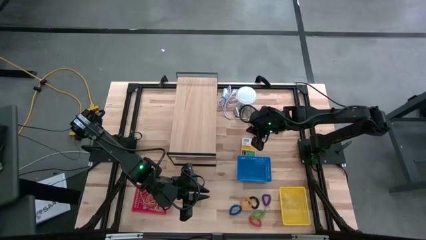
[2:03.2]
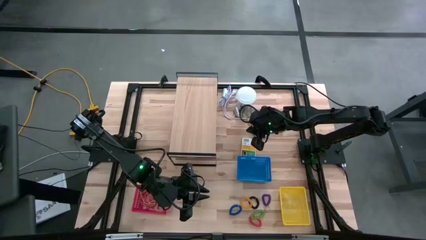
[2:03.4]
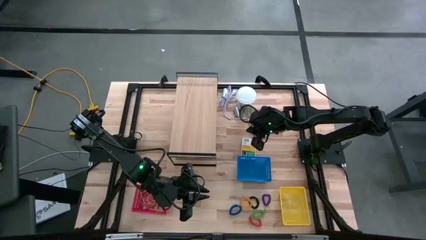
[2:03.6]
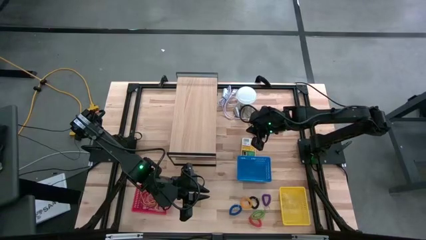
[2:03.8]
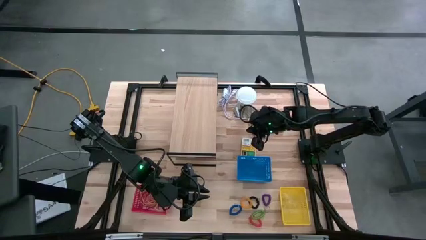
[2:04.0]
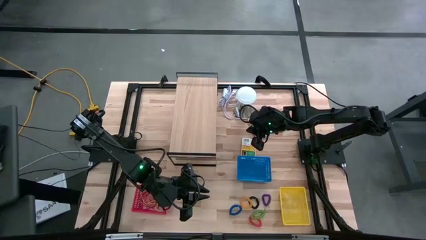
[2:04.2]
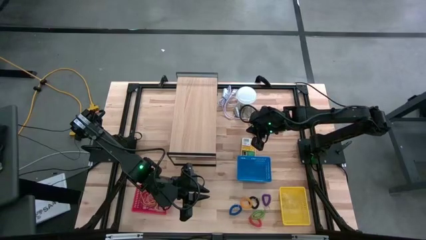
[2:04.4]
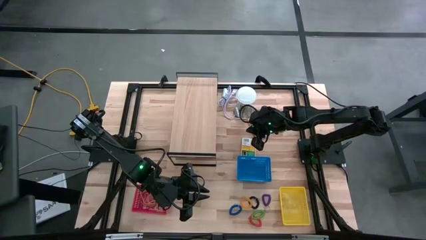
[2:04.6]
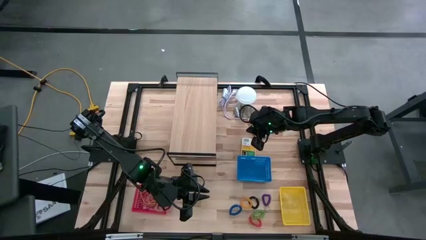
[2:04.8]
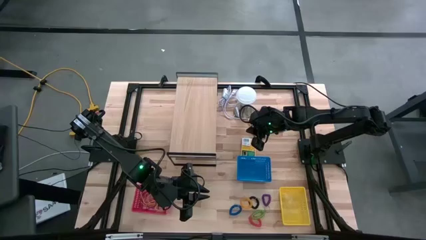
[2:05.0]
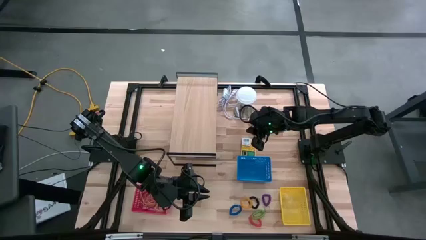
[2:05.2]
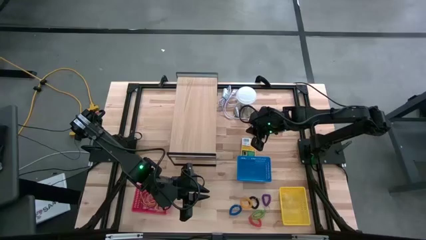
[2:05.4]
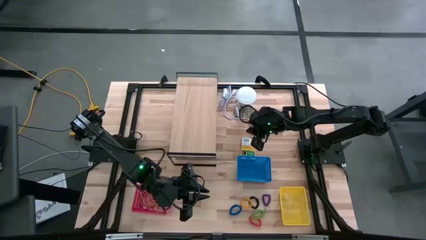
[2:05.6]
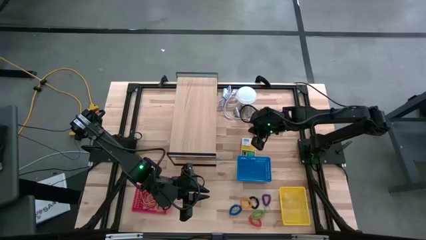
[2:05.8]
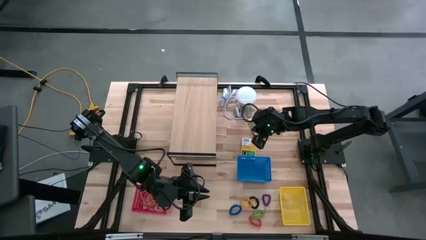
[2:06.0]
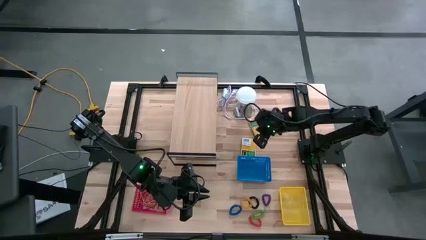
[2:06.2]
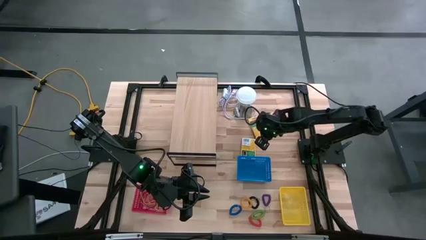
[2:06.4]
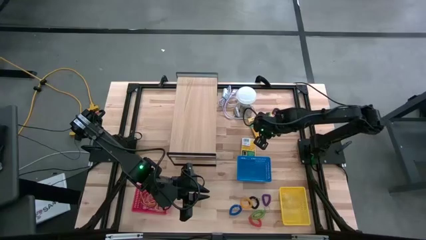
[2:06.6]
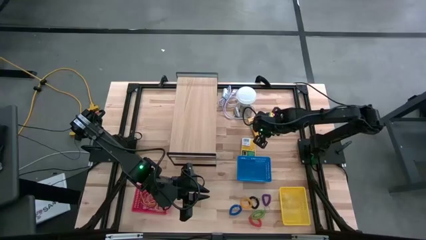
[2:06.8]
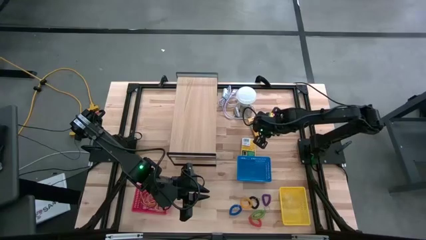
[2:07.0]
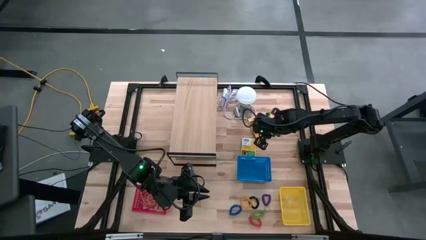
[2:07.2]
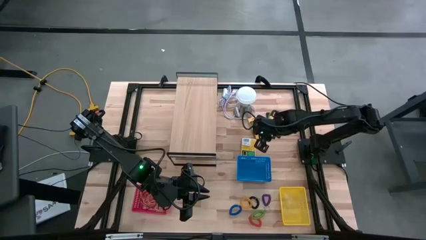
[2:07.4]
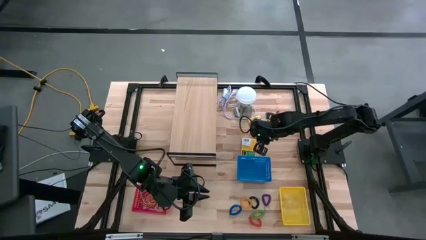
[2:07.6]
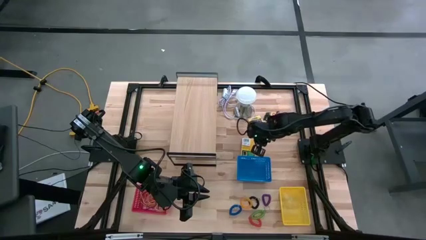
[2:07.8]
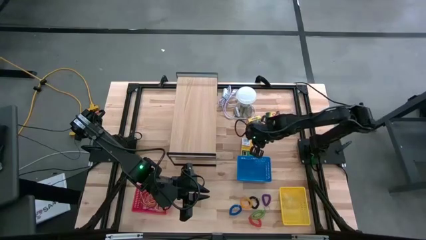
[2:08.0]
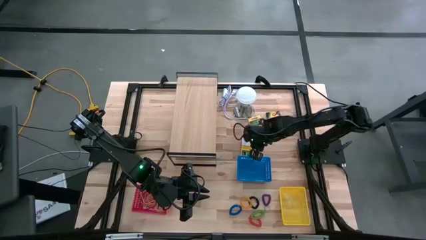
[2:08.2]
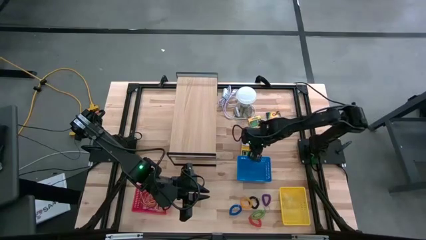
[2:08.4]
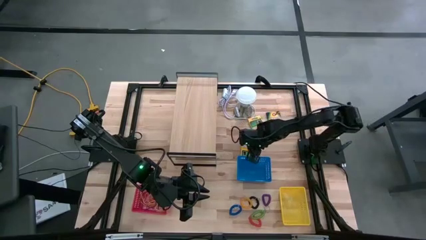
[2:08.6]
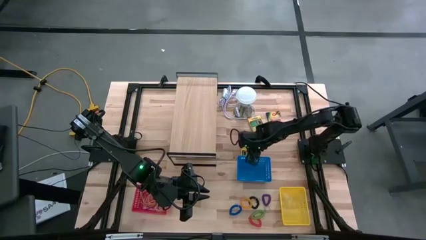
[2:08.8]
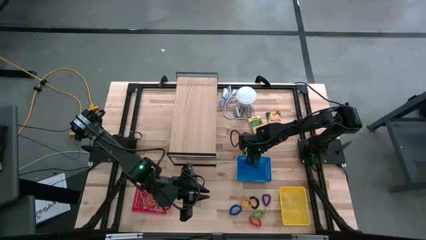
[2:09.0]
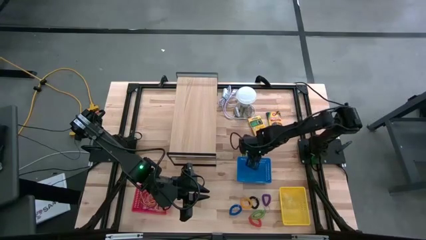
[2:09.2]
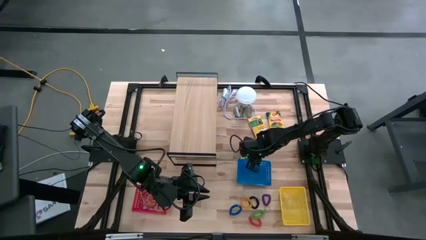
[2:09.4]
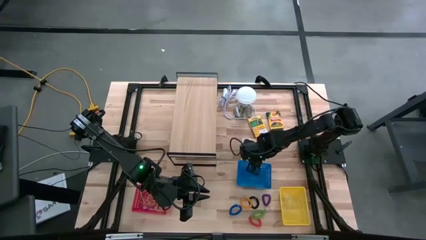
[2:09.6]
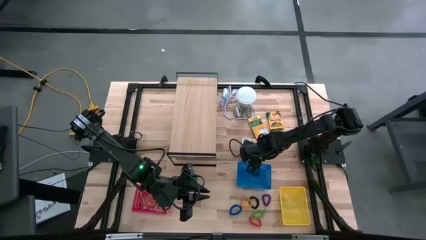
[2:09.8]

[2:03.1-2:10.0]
Task: Pick & Place Office Desk Supplies
Adjust the blue bin

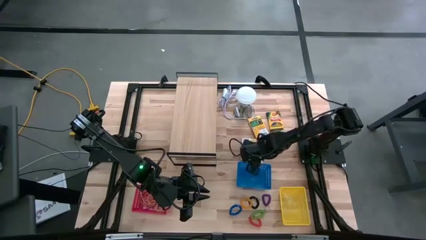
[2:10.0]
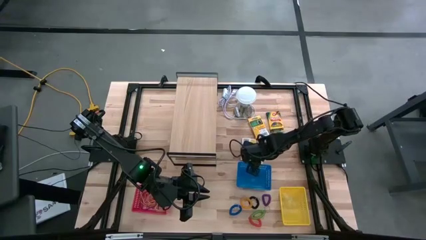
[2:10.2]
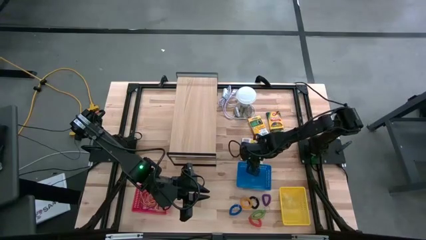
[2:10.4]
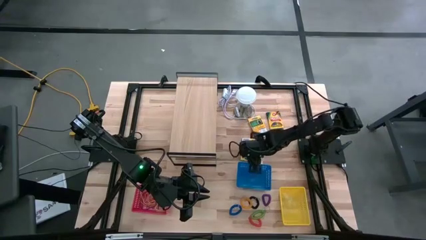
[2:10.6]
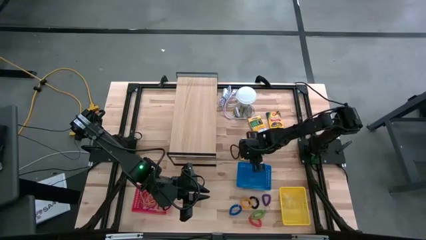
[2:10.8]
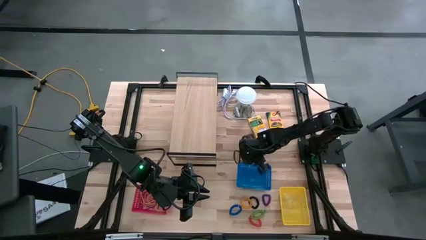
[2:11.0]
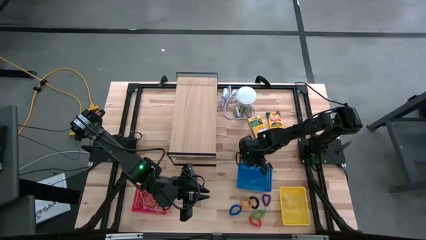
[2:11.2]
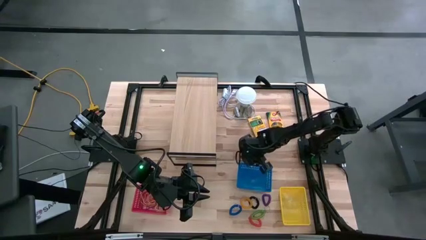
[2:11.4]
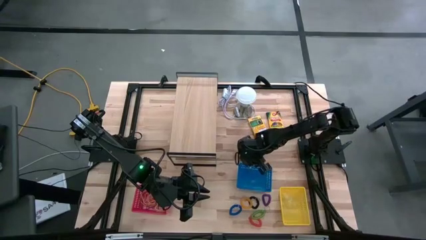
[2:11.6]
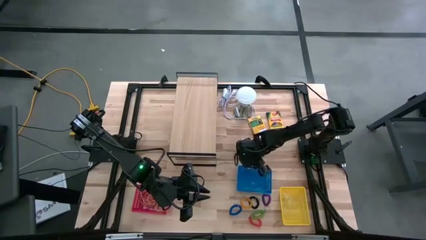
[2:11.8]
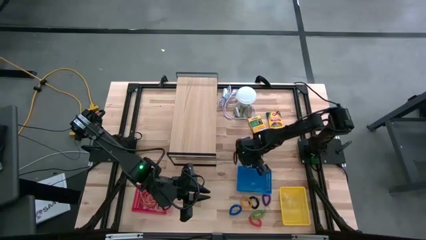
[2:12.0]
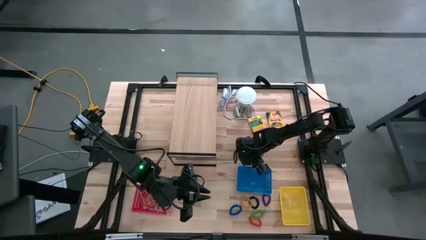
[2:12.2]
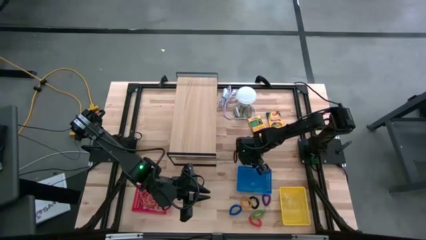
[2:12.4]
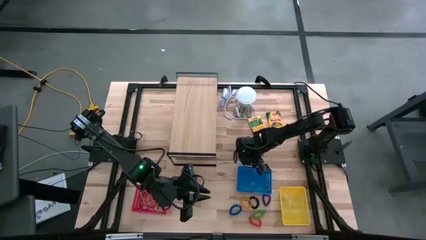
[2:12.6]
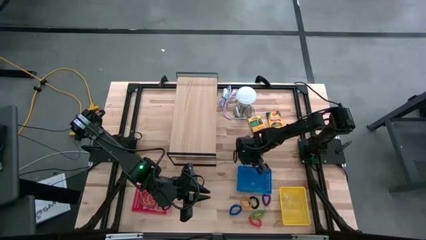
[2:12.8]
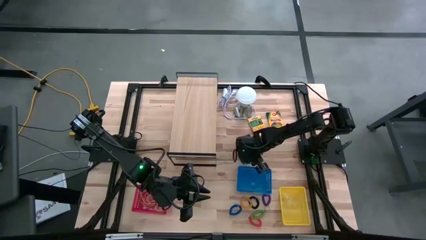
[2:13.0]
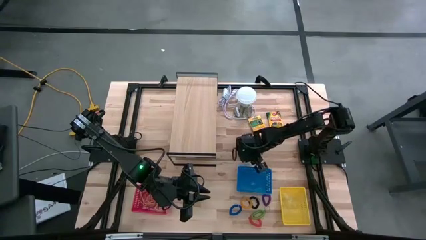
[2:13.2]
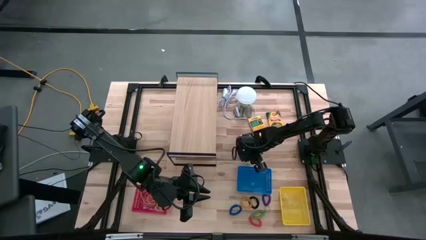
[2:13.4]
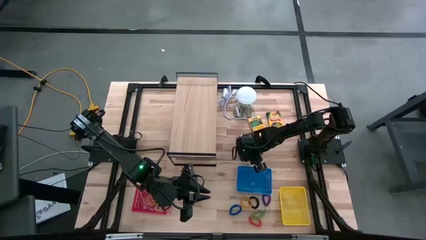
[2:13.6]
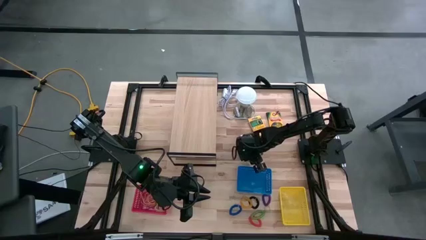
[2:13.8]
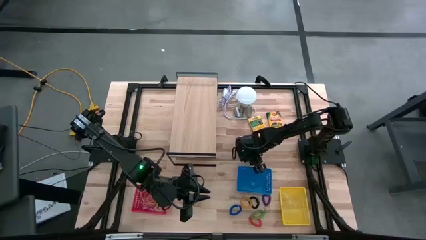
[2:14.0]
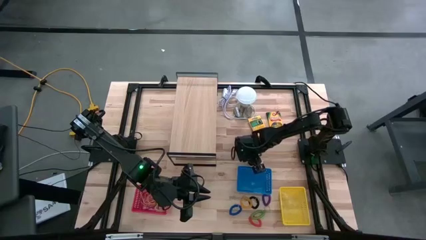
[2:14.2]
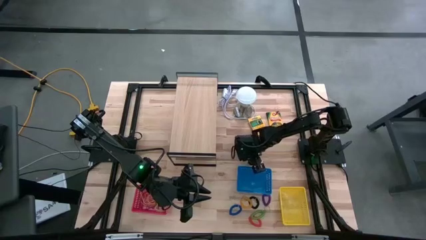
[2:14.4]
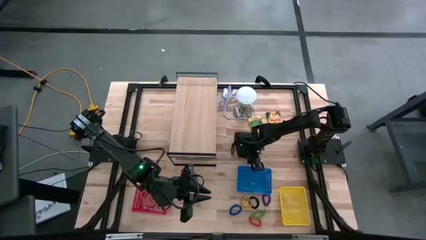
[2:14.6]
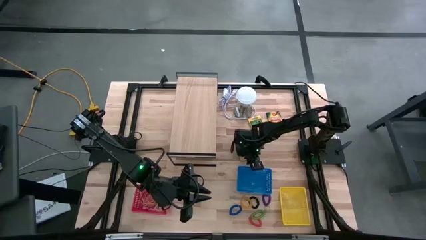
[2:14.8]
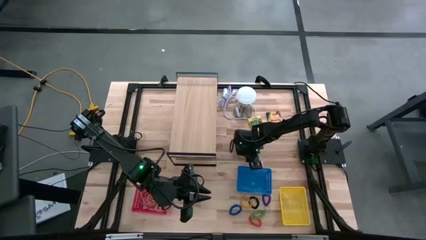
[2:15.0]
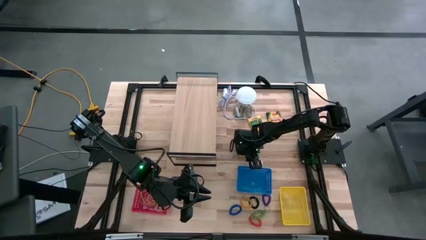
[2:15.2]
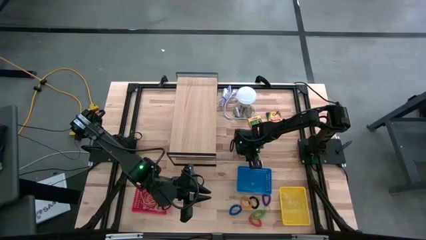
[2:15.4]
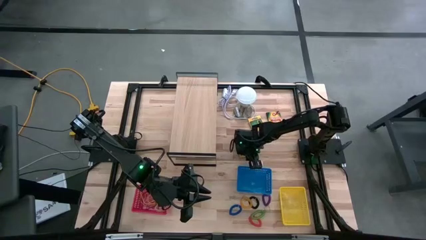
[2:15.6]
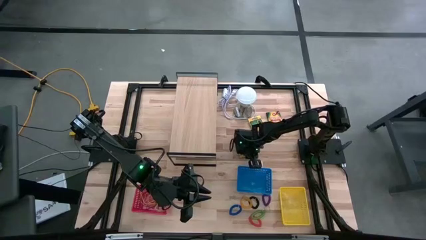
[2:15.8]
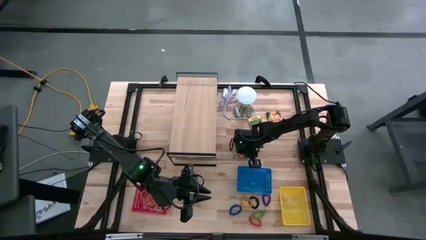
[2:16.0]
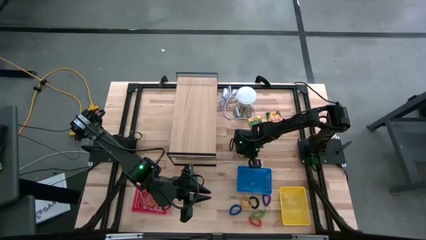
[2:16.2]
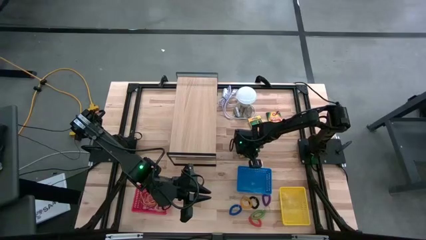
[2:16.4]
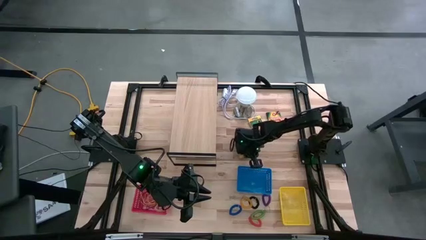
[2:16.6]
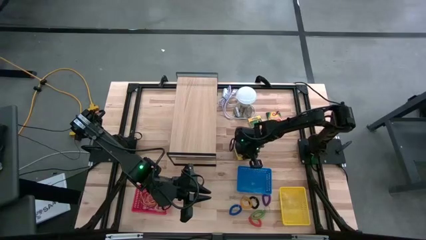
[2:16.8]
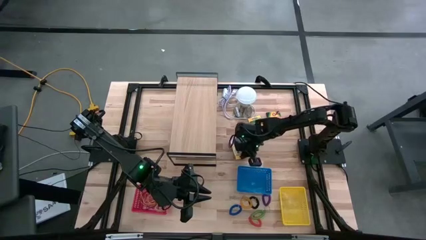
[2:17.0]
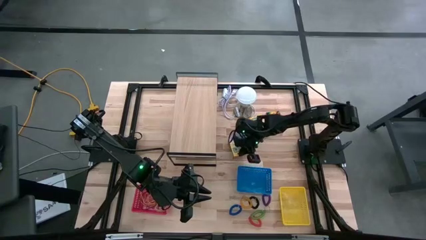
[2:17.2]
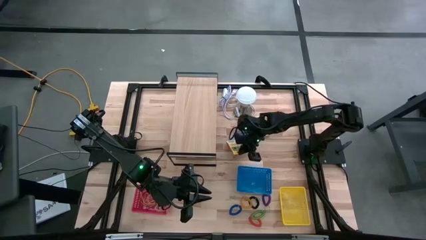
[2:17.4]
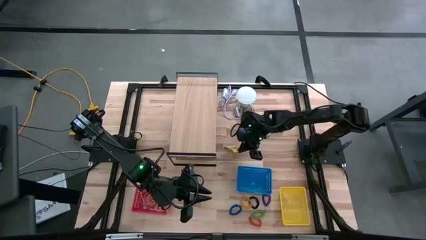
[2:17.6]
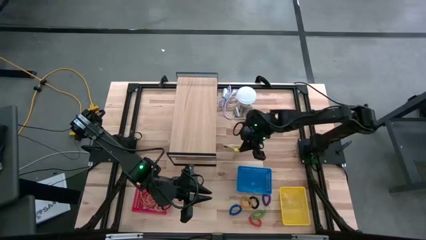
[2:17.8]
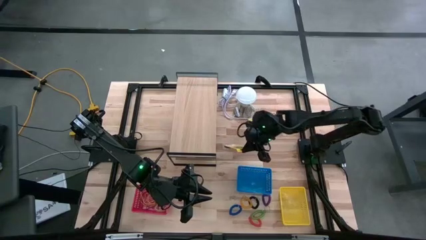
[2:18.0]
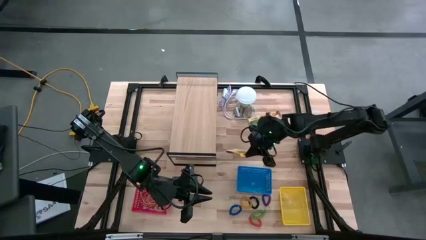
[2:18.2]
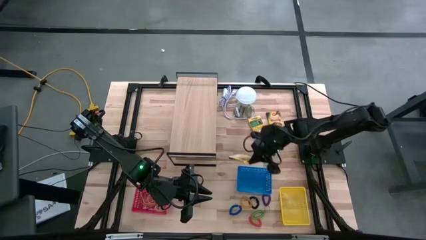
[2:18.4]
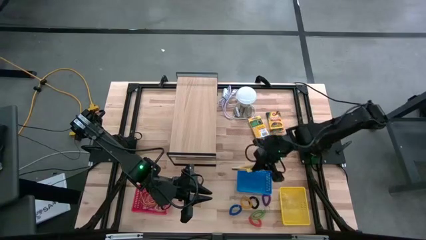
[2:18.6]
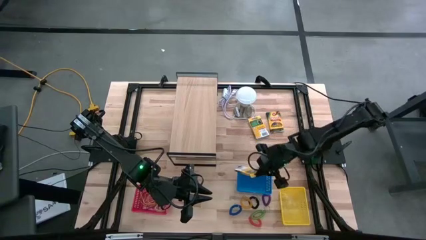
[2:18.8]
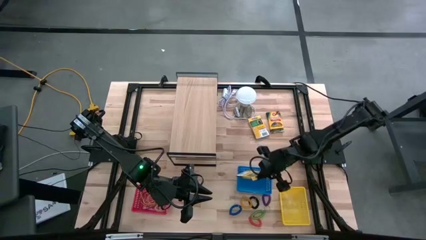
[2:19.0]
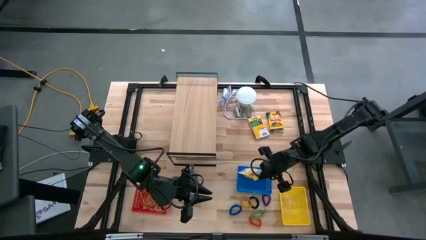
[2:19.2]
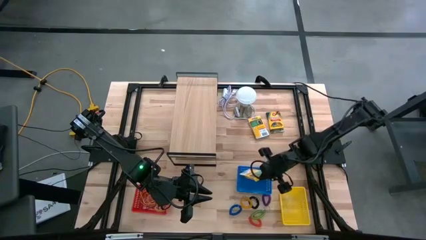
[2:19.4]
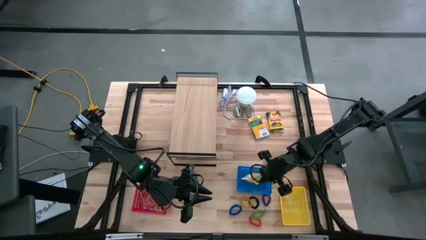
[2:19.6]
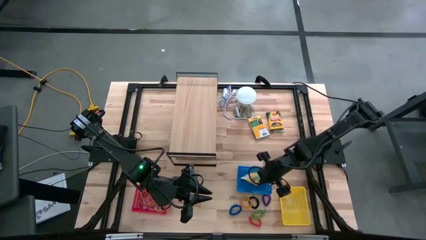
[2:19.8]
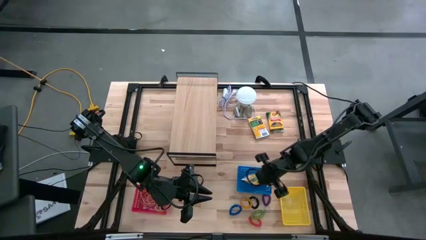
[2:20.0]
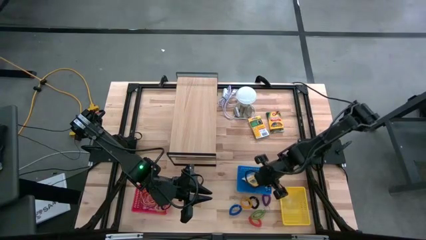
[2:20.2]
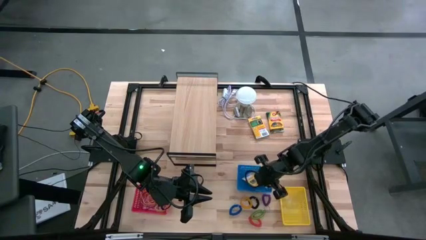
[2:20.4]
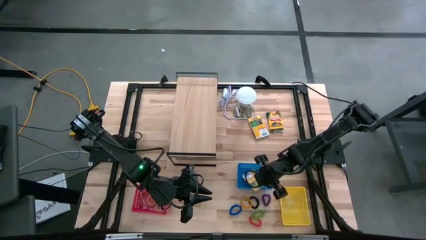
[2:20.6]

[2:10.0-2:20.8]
Put the bottom yellow crayon box into the blue bin
